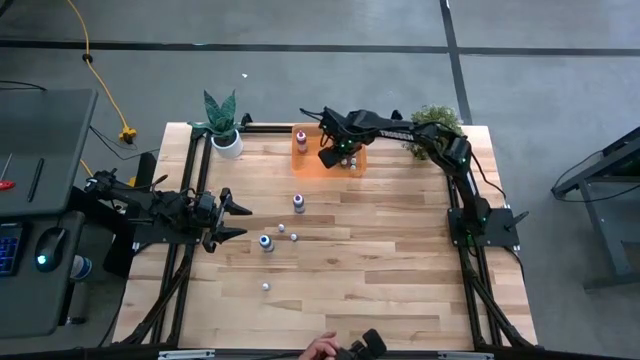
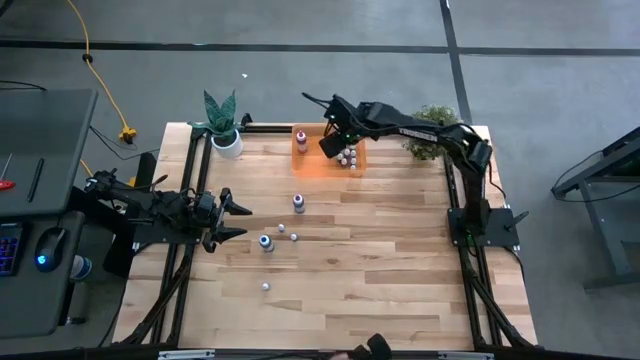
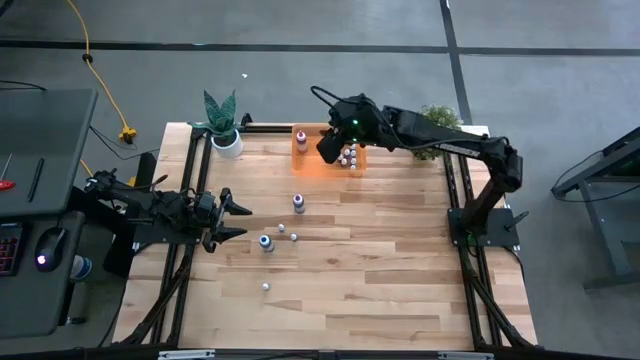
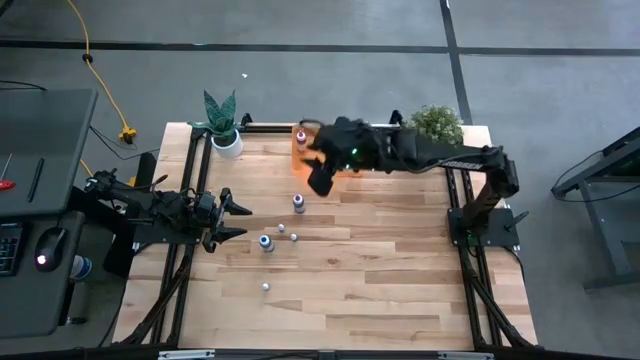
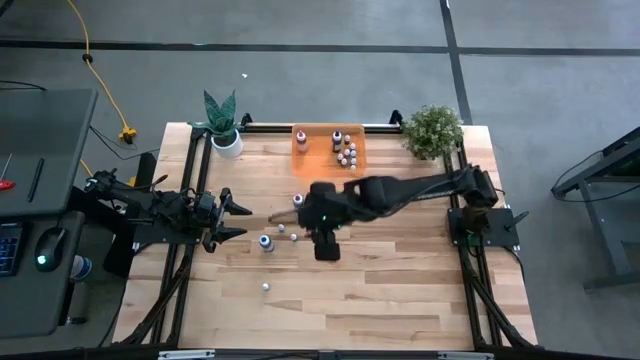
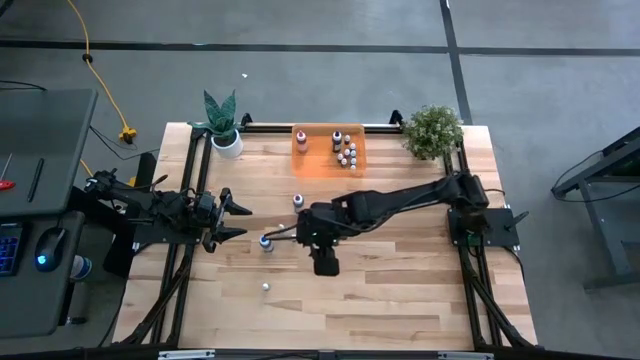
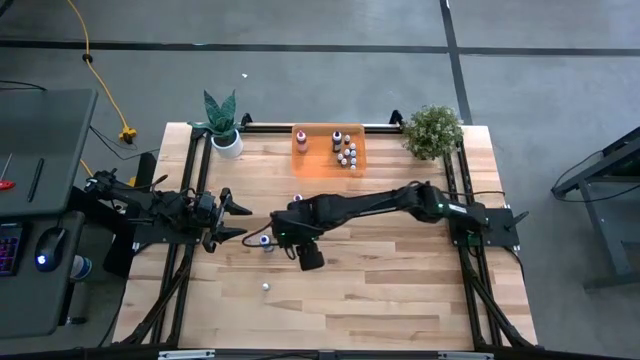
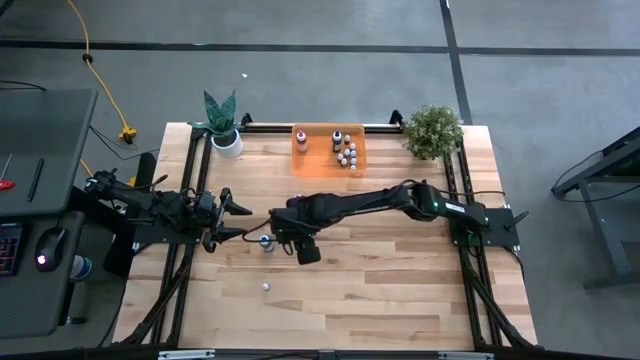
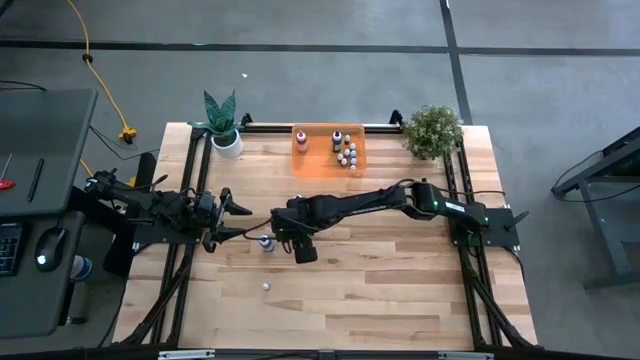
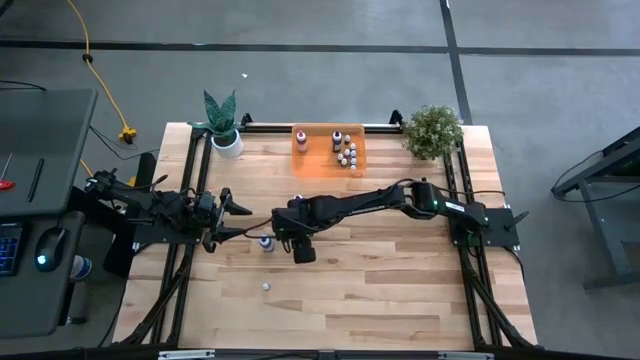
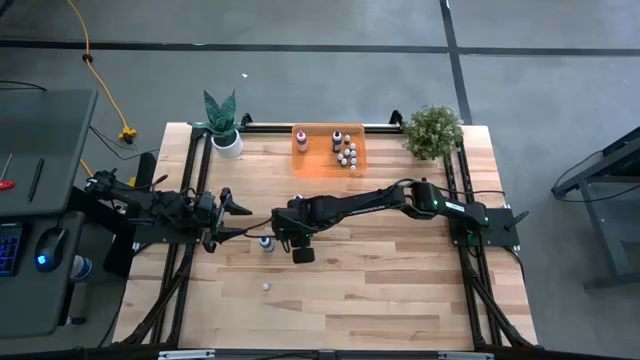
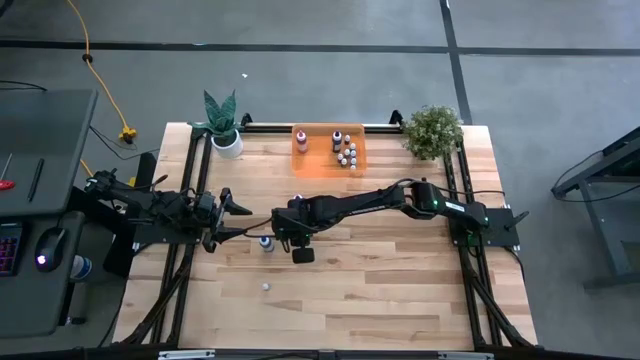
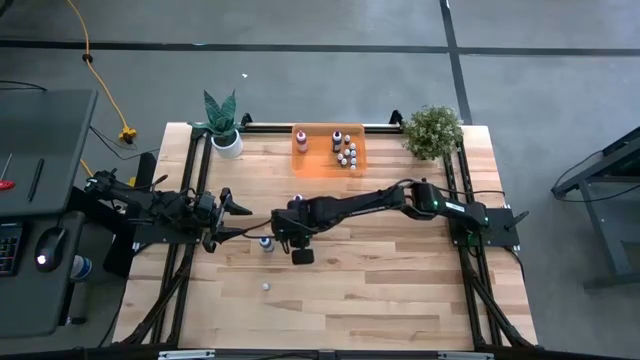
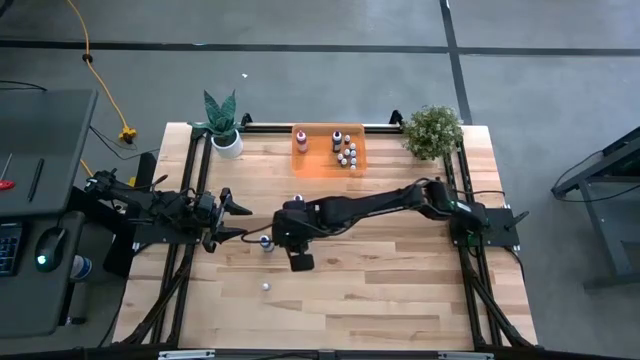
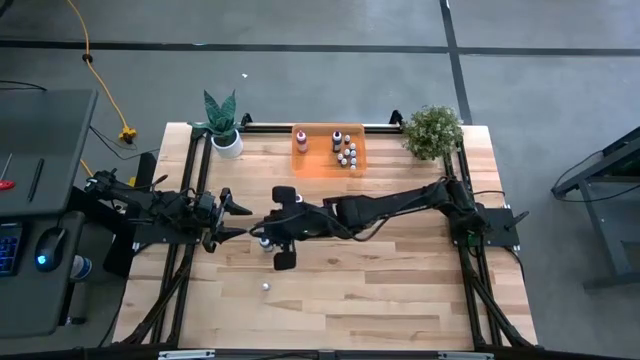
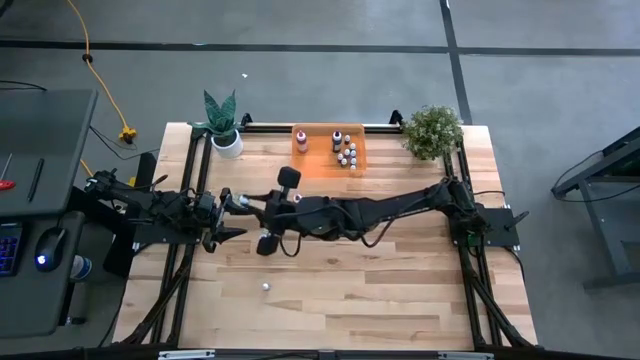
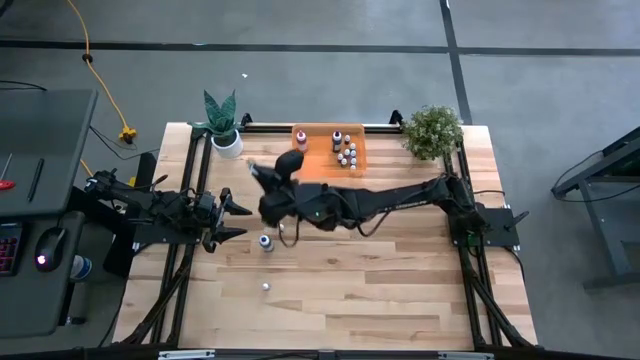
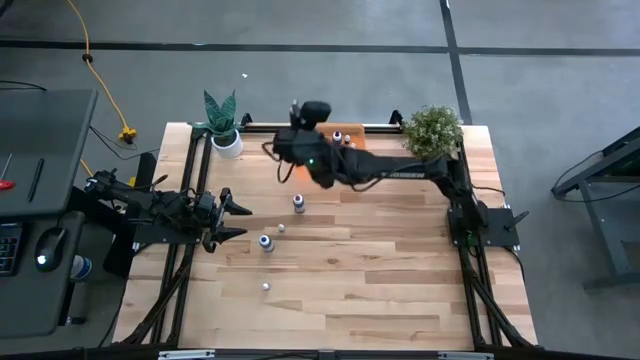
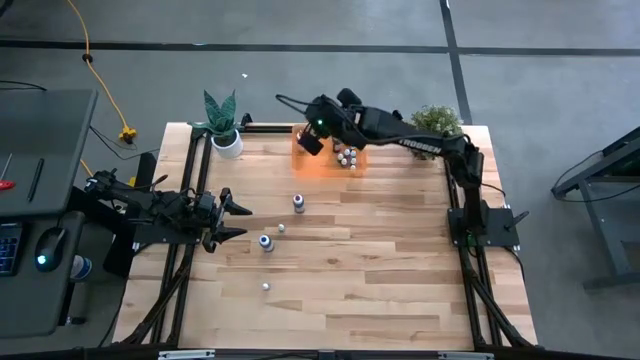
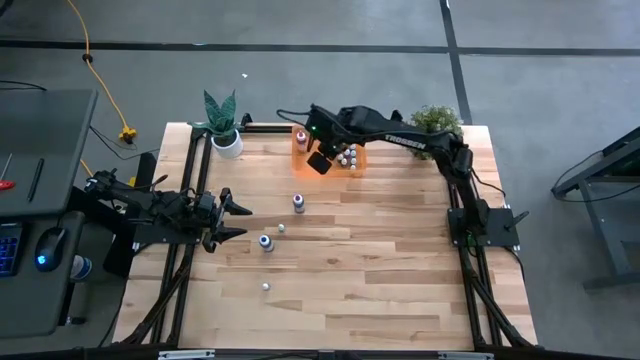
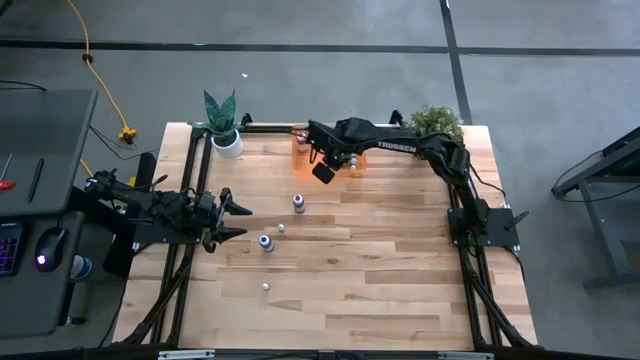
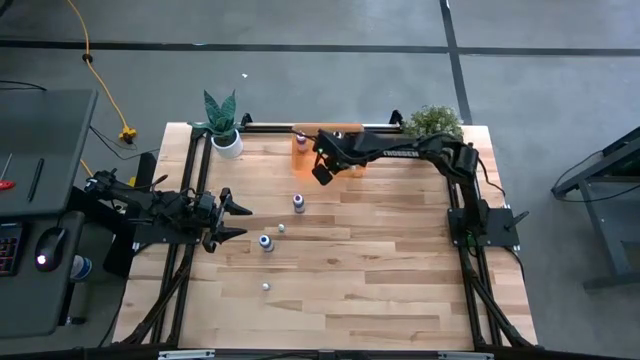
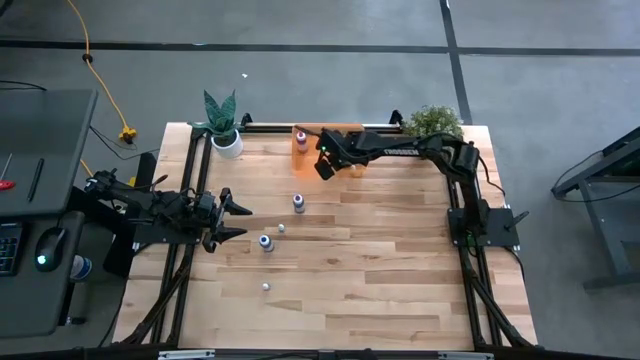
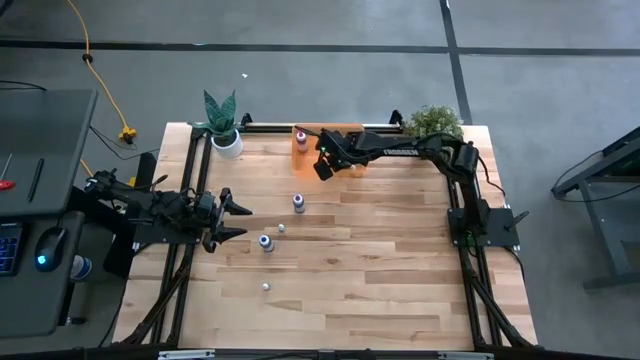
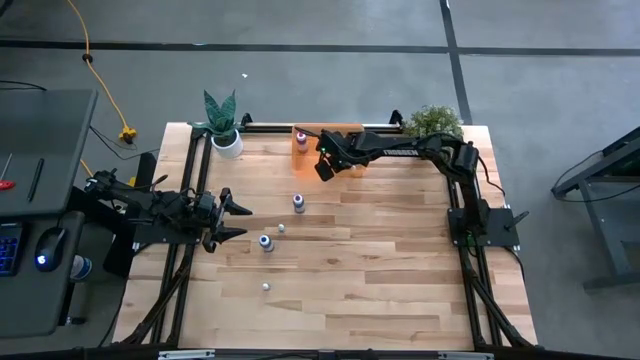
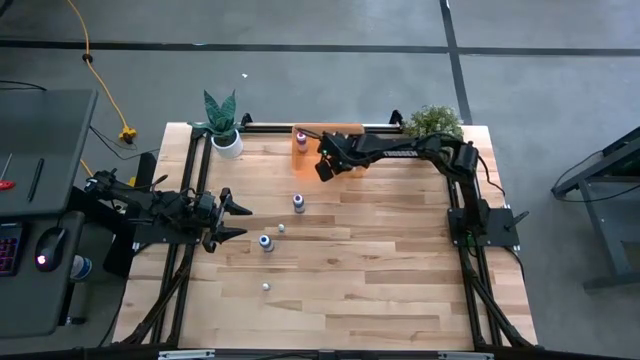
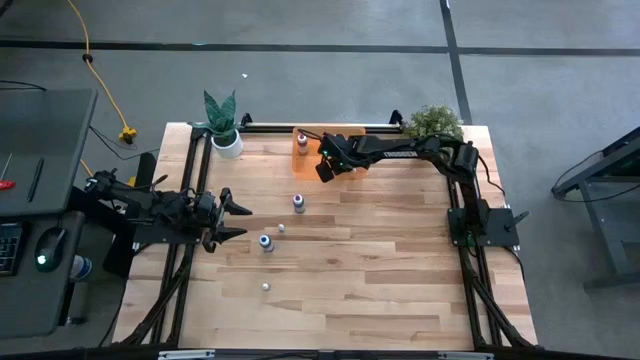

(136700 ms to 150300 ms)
Task: Pick & Place food coloring
Put the small black food coloring bottle into the orange bin

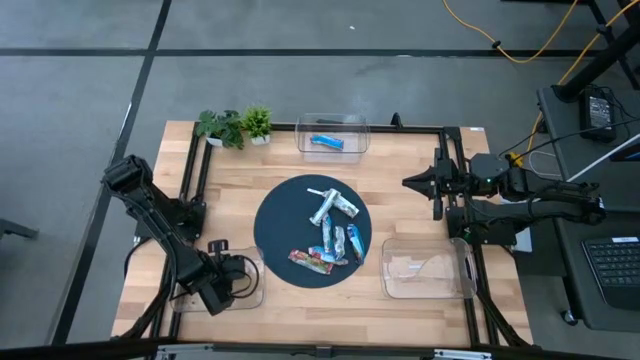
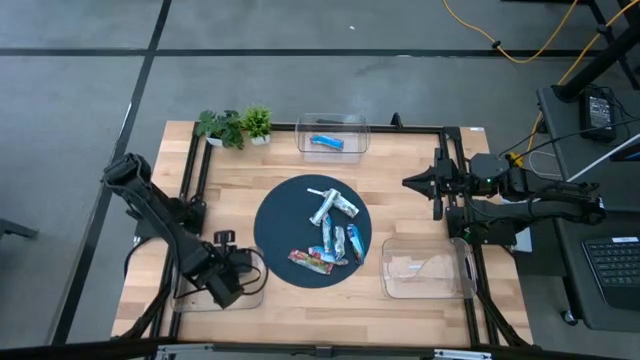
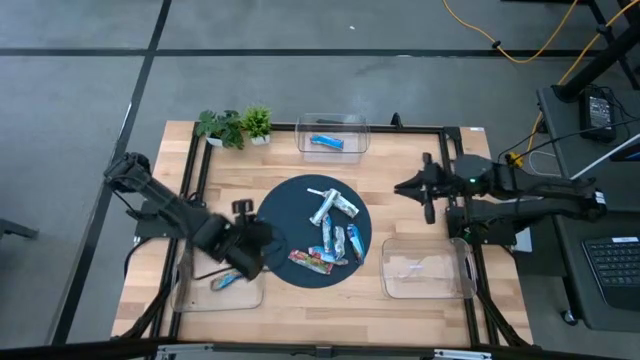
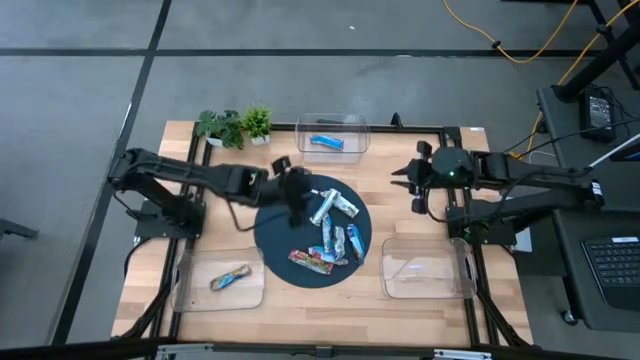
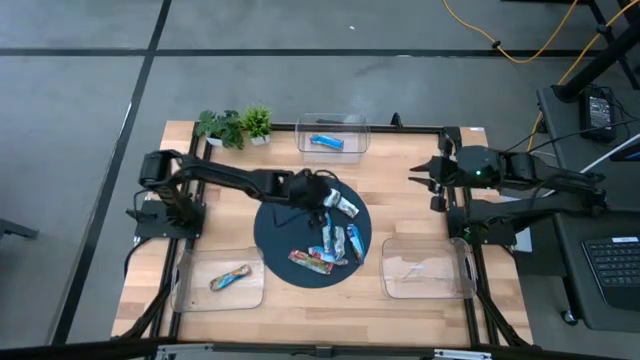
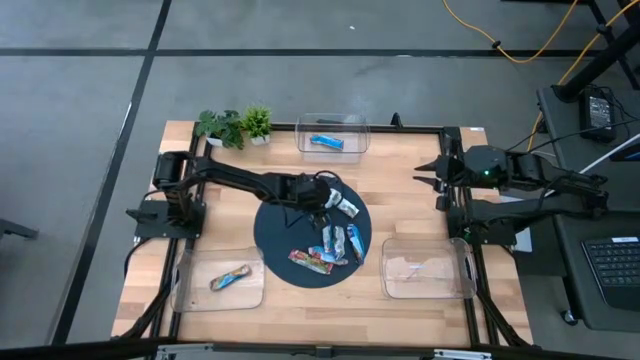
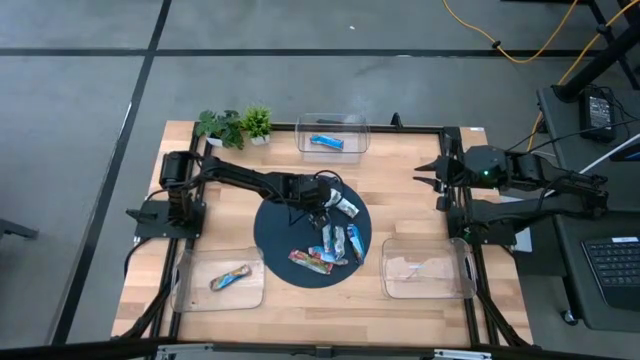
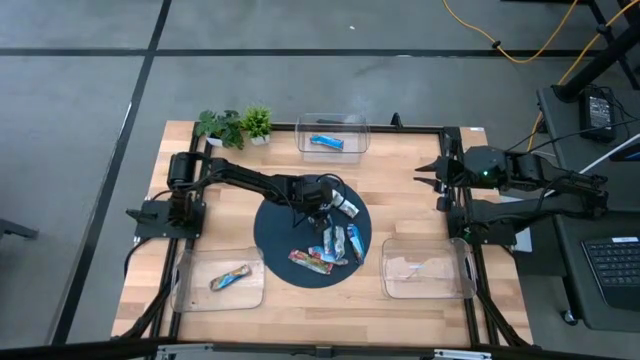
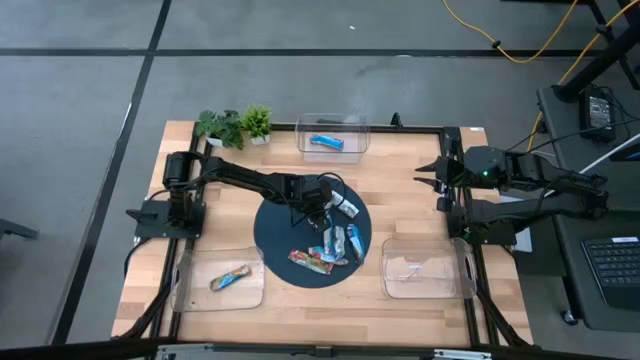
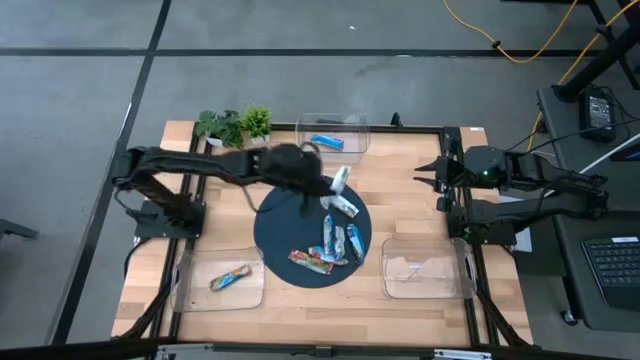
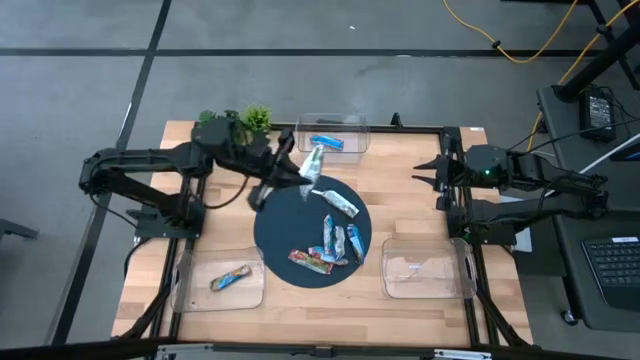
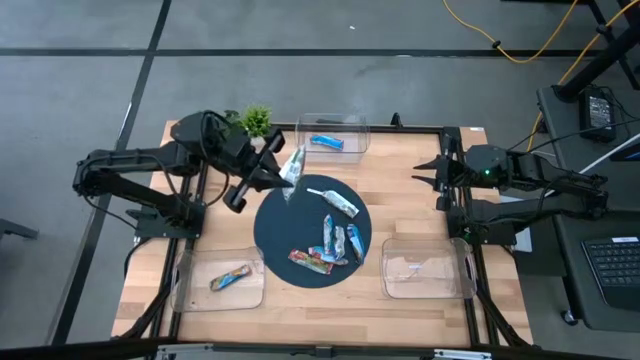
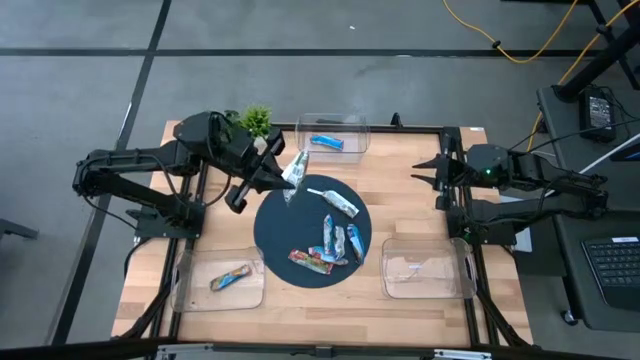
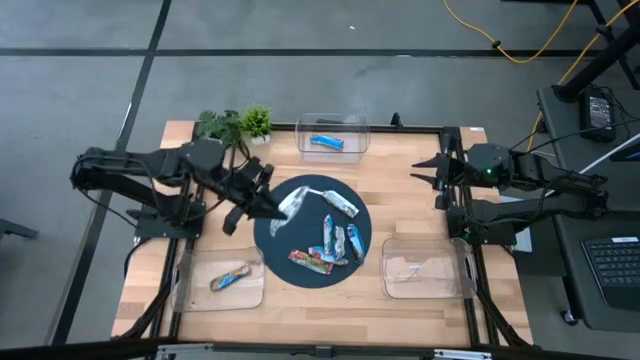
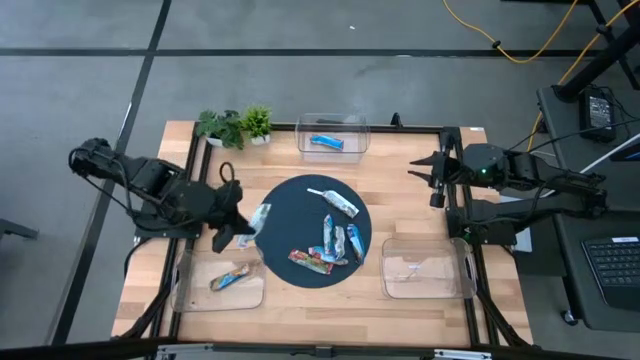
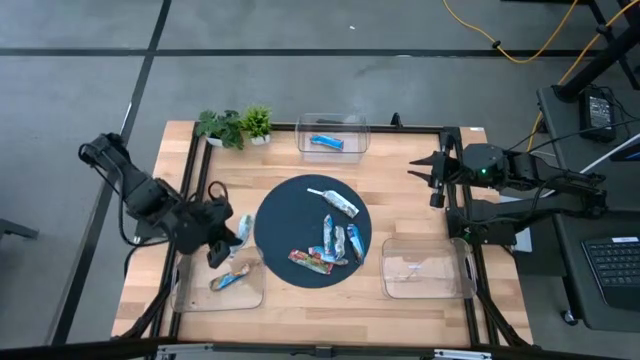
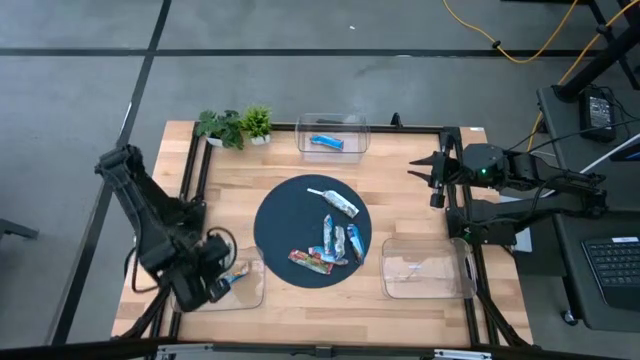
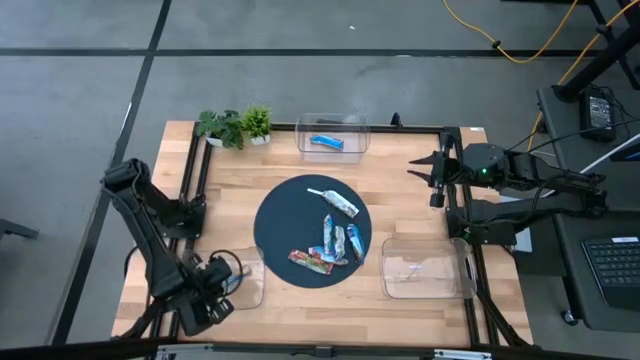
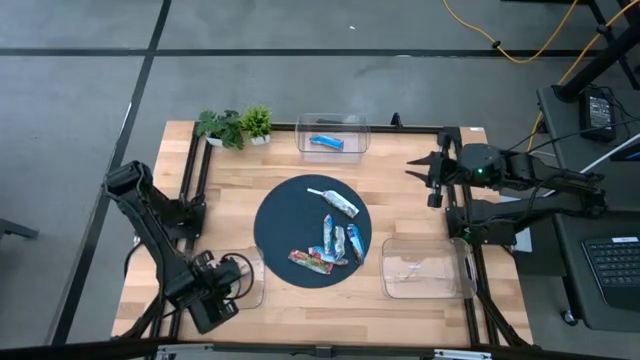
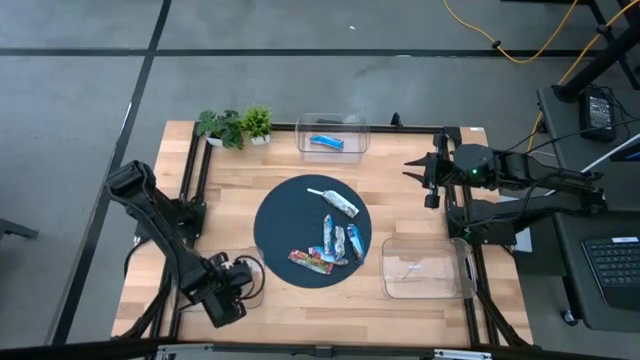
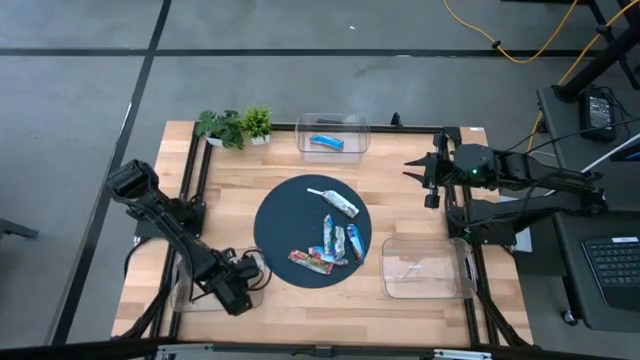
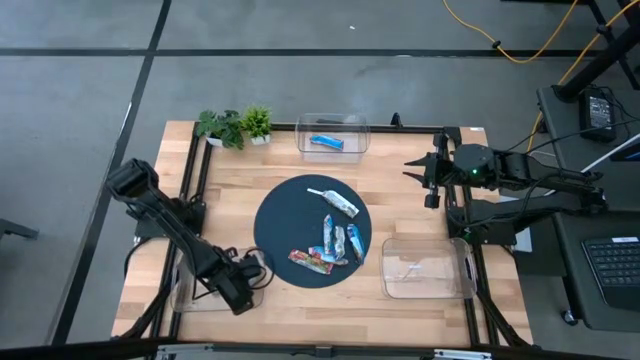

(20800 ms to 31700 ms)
Task: Pick and place Granola Bars by type
Put the orange granola bar into the bottom left transparent bin
